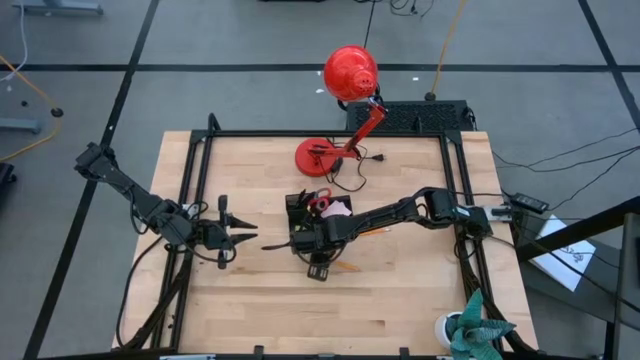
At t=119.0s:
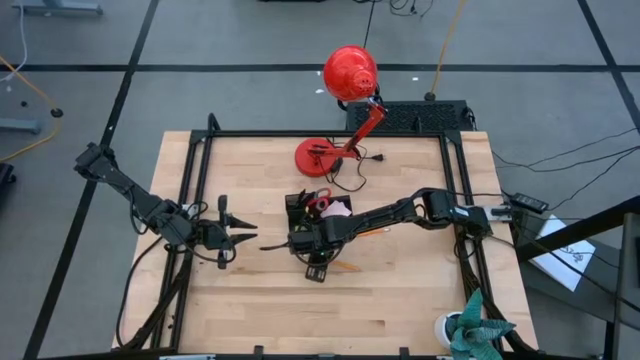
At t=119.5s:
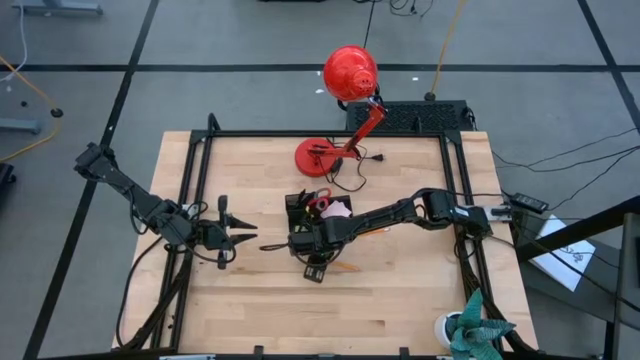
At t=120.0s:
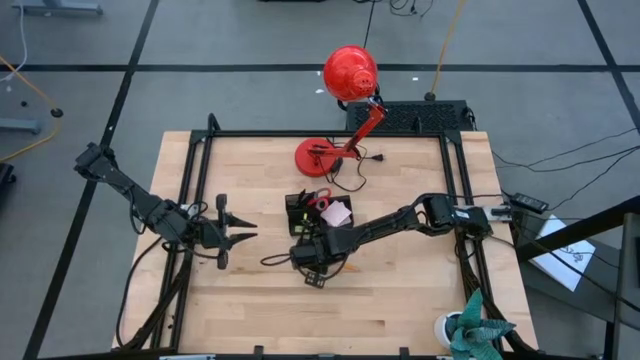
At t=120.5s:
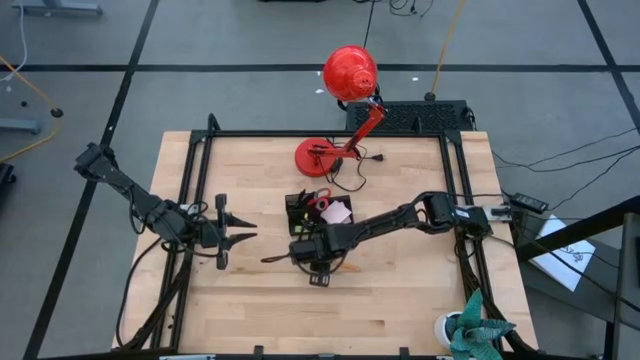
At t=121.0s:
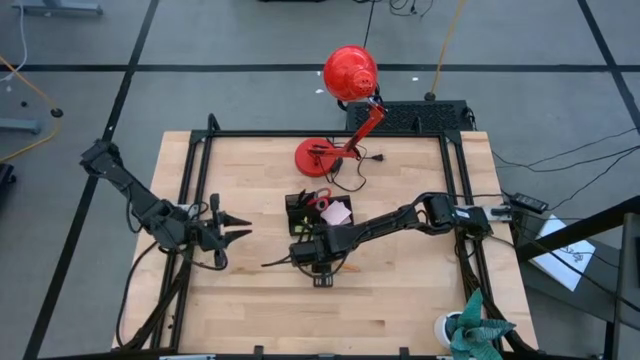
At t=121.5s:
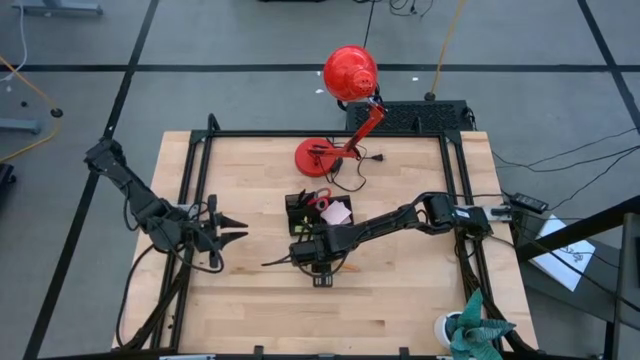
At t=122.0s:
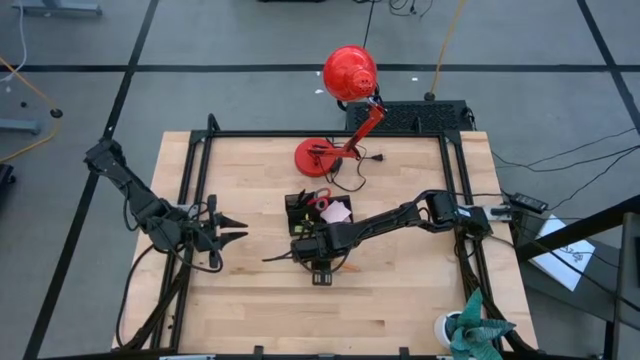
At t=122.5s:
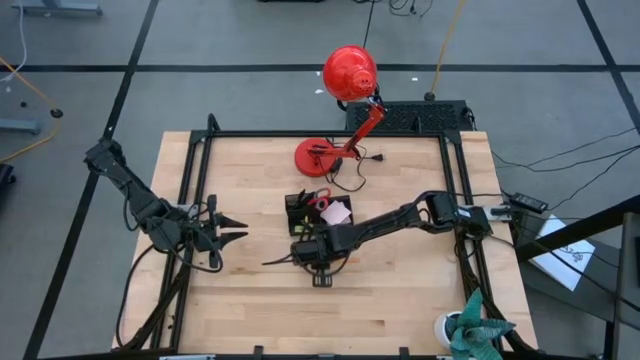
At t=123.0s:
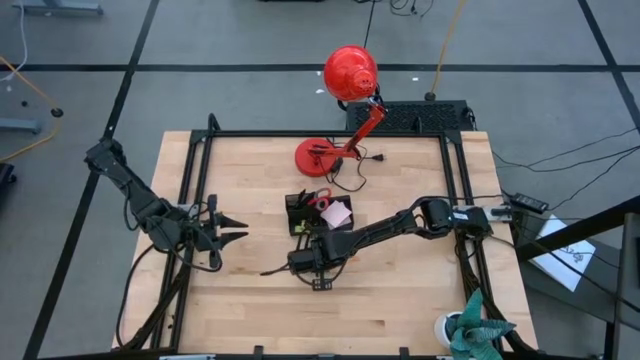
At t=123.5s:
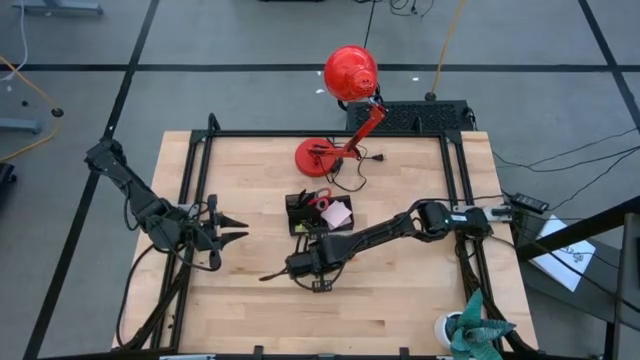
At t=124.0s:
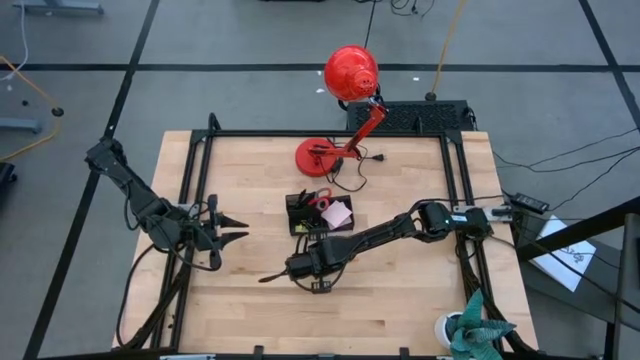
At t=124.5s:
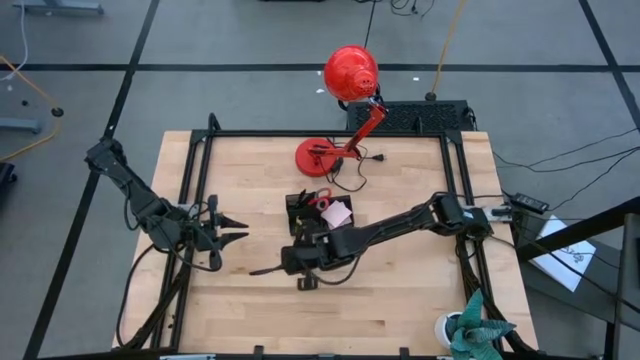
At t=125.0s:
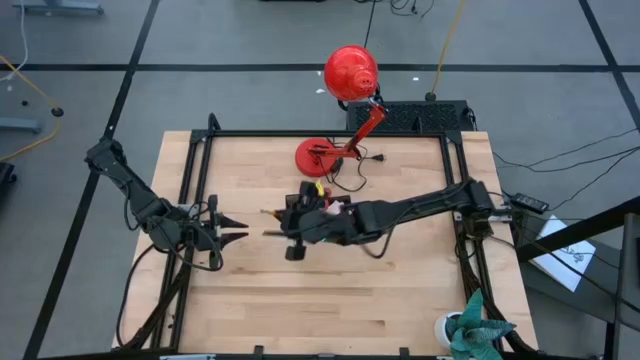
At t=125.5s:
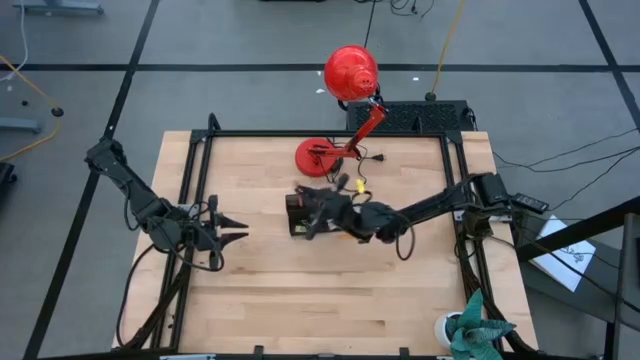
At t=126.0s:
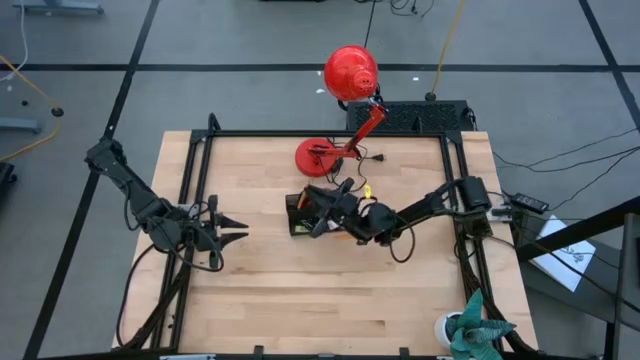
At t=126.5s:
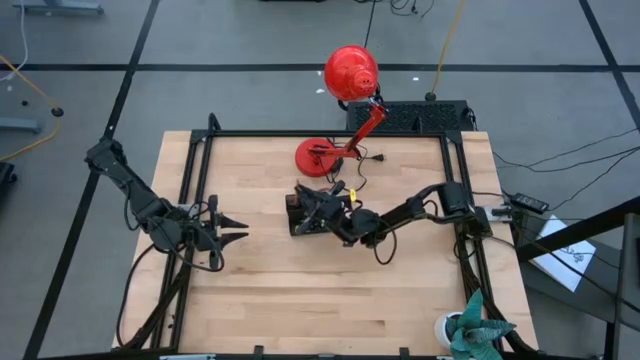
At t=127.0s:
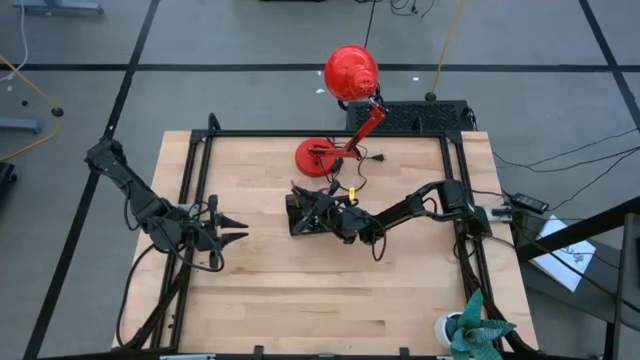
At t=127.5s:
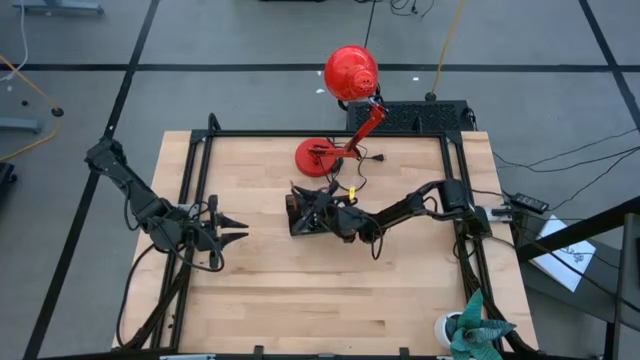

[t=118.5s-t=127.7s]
Task: Pick and place office supplies into organizer
Put the bottom yellow pencil into the desk organizer

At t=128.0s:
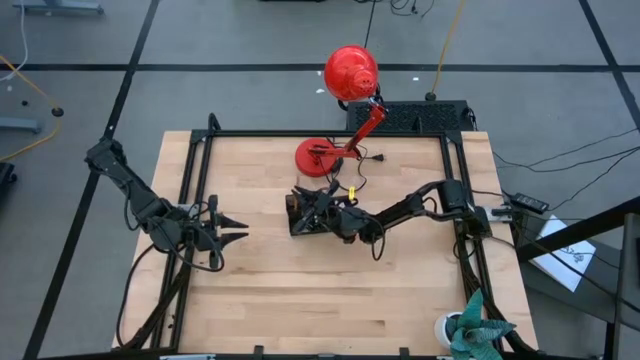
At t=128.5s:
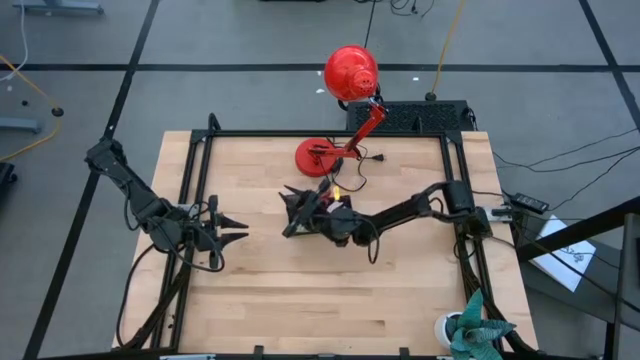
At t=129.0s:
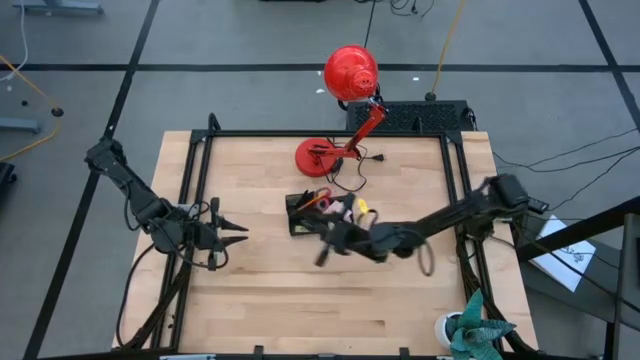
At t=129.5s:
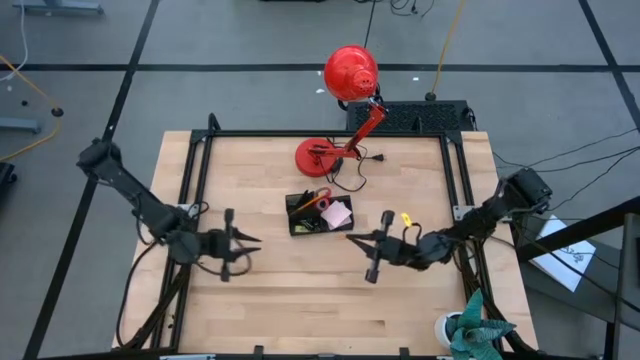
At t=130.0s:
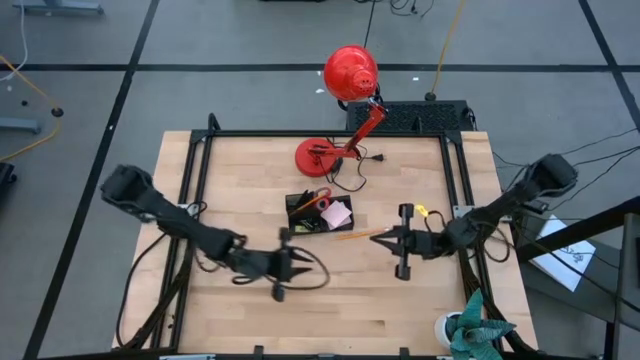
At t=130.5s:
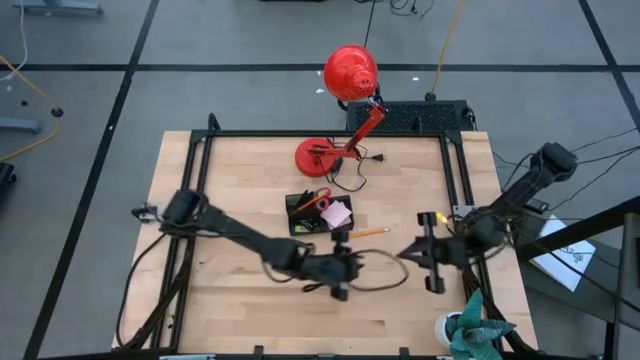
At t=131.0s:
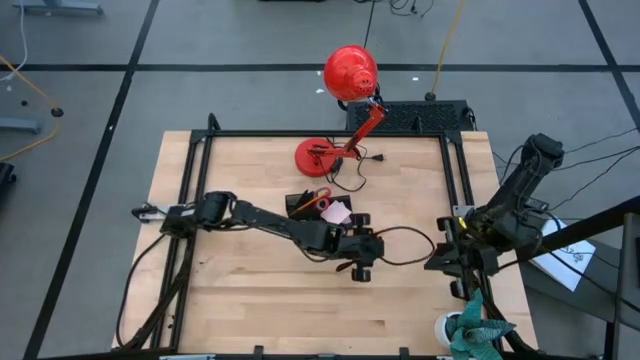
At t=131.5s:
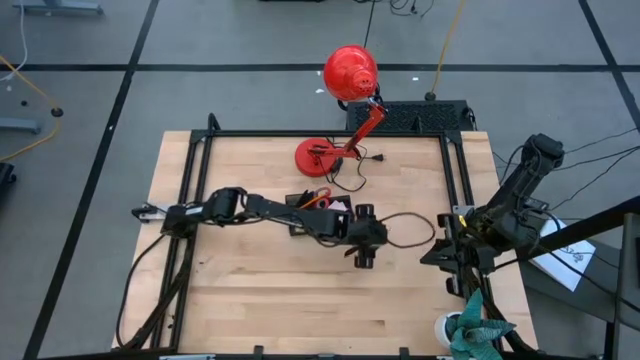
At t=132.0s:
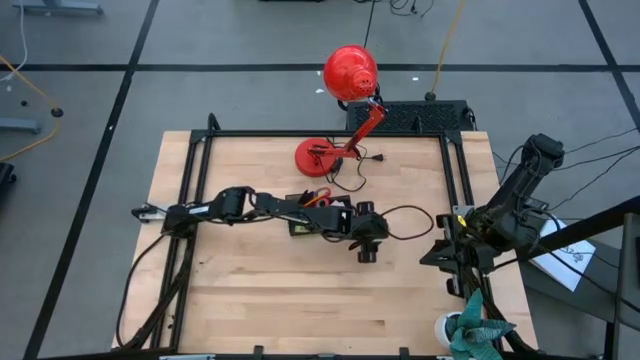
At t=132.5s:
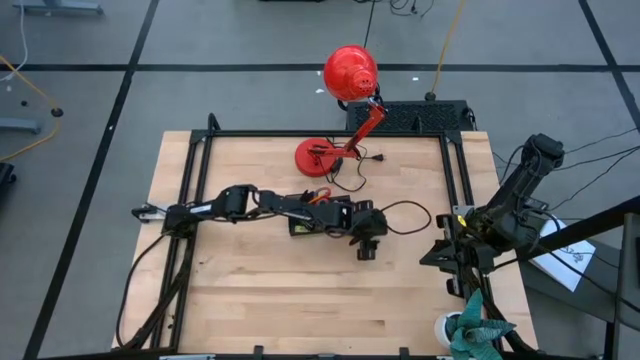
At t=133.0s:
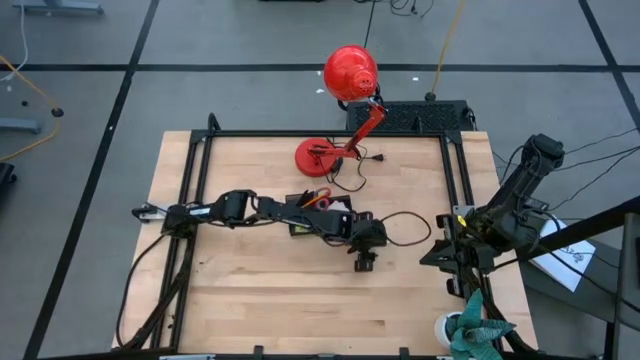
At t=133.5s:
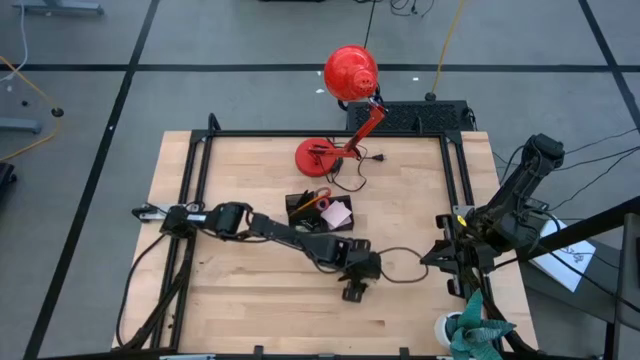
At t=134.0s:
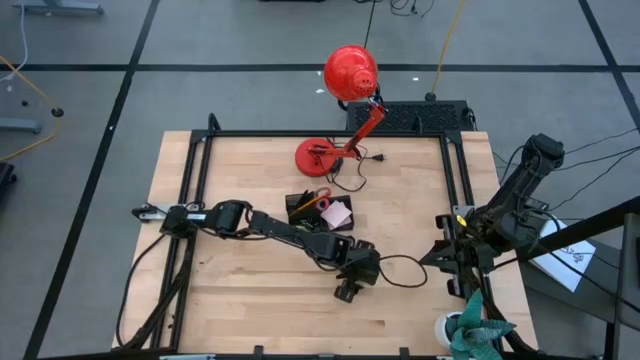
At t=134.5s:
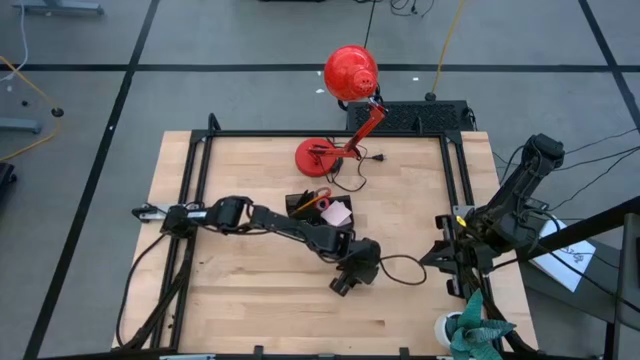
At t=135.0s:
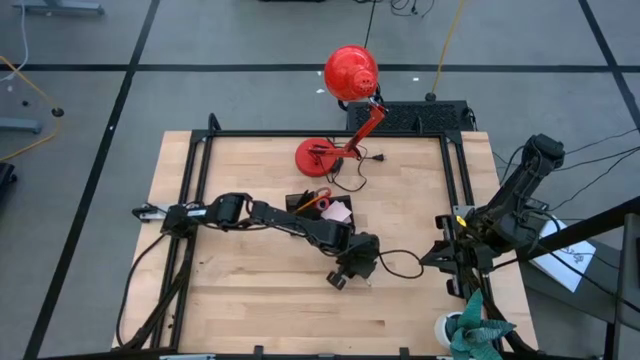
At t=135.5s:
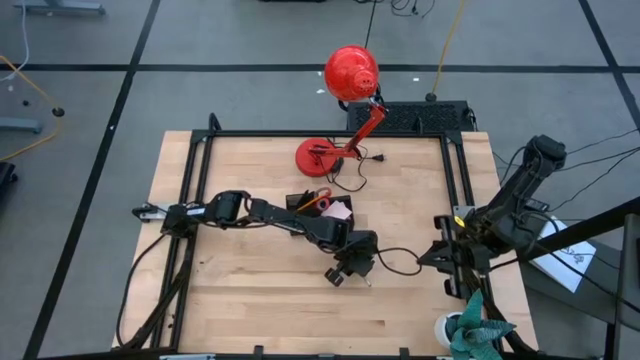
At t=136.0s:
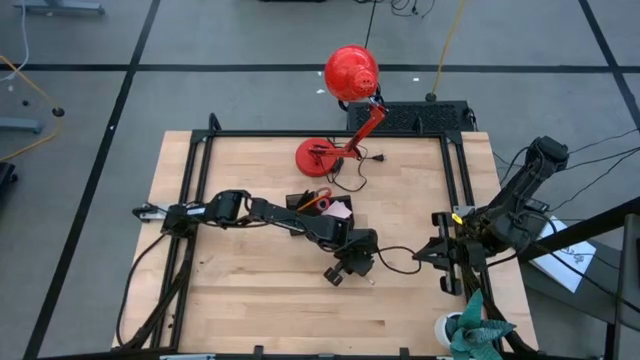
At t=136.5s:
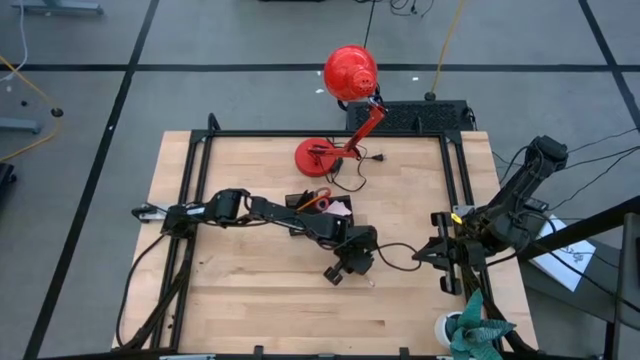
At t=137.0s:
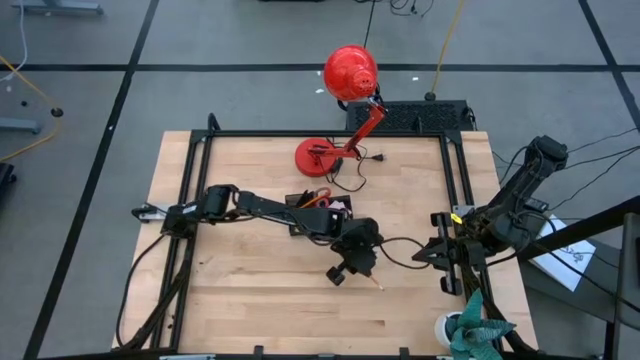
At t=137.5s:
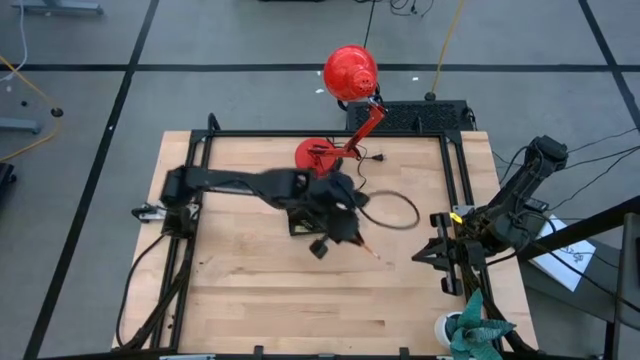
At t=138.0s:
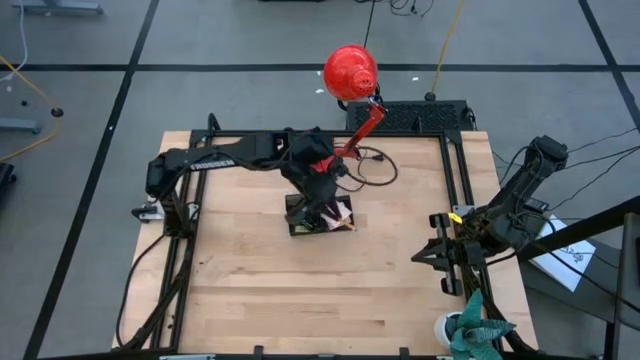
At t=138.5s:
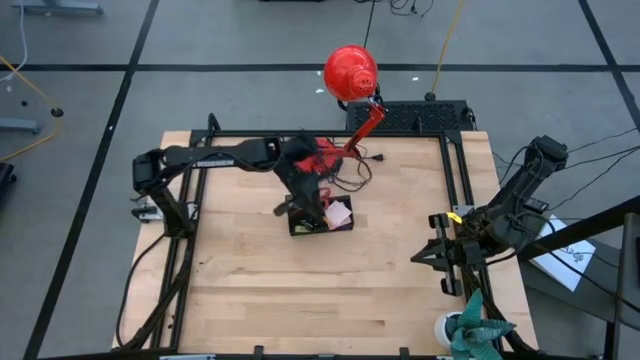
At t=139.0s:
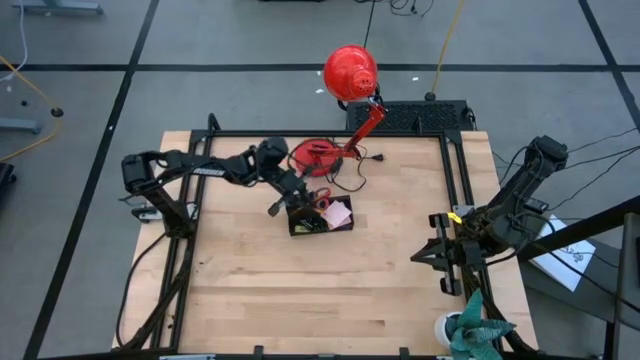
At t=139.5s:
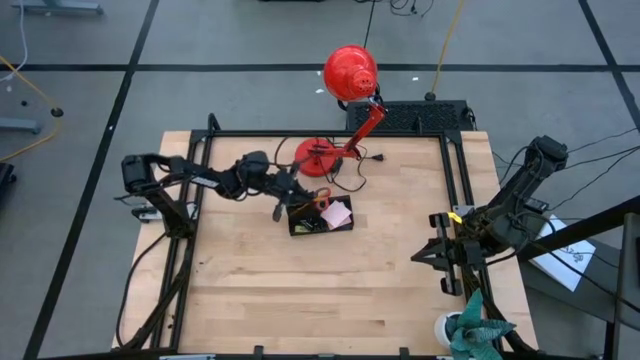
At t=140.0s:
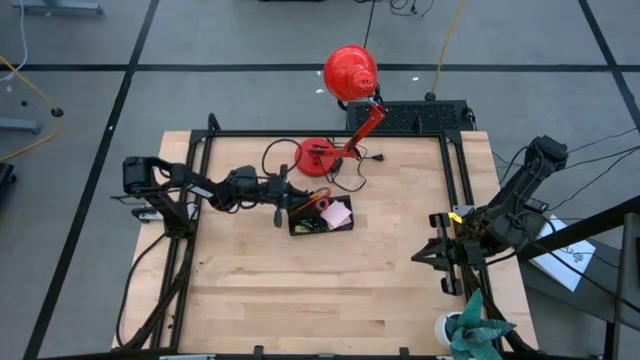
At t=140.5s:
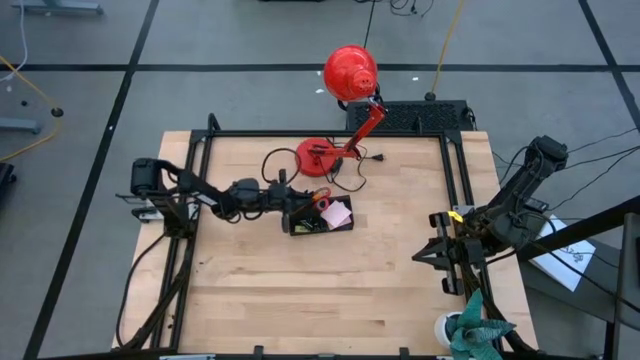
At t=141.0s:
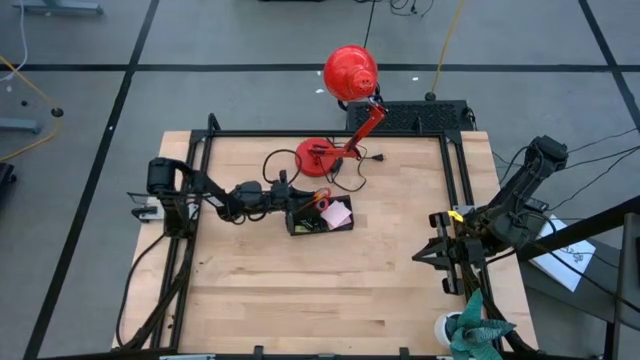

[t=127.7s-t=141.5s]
Put the yellow pencil into the desk organizer
